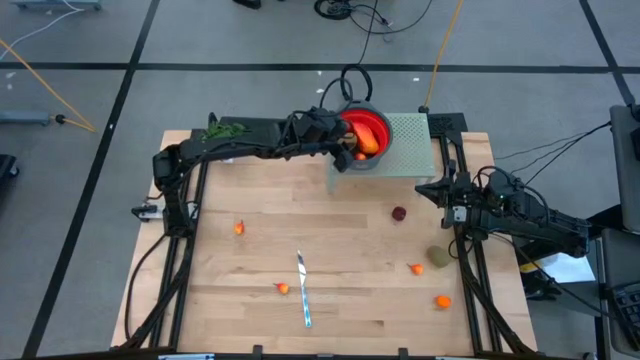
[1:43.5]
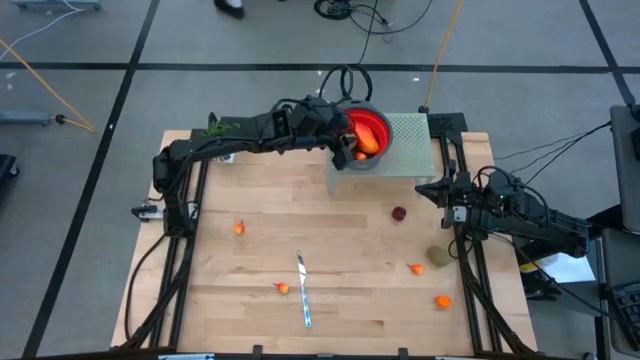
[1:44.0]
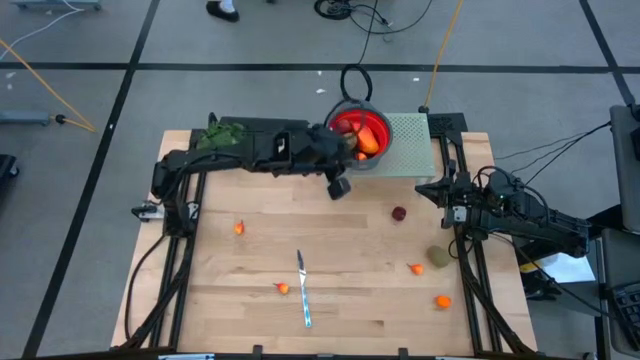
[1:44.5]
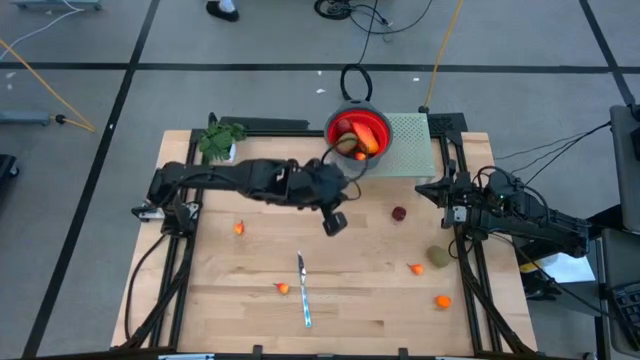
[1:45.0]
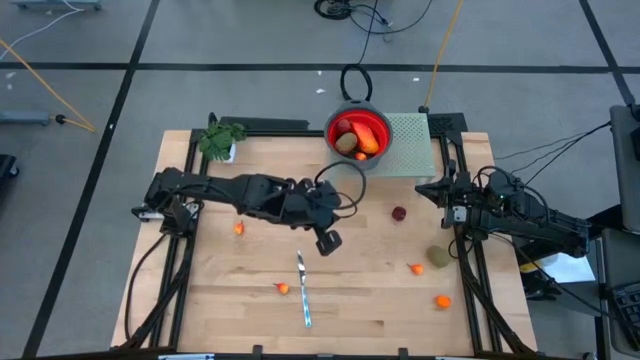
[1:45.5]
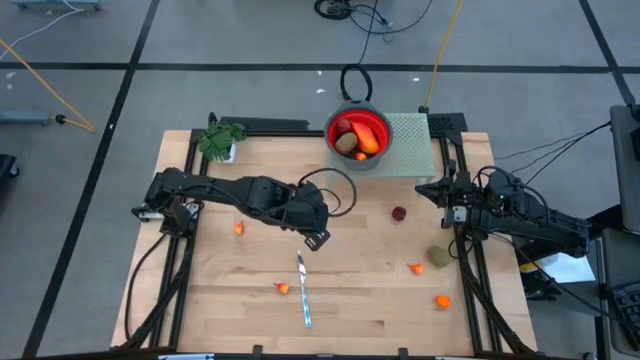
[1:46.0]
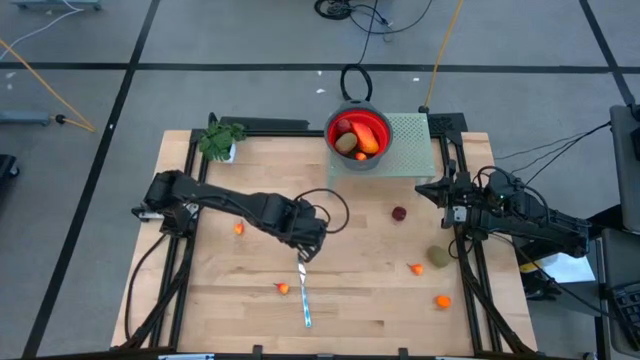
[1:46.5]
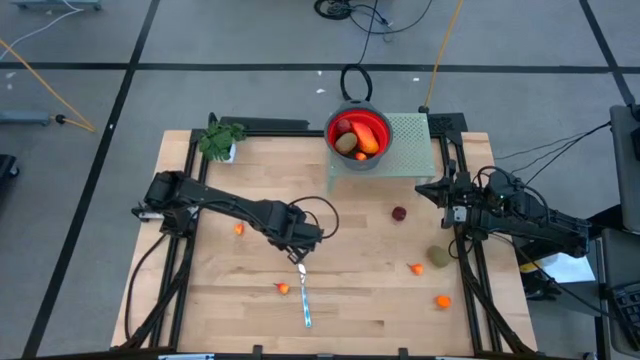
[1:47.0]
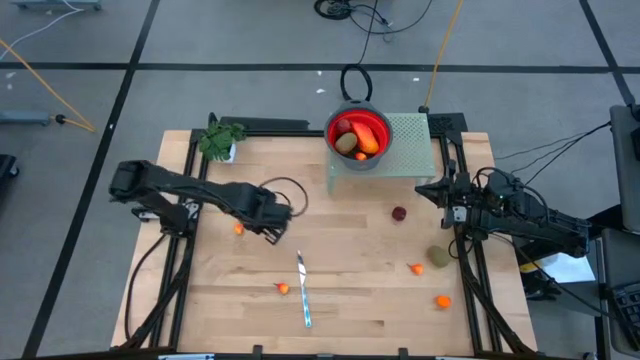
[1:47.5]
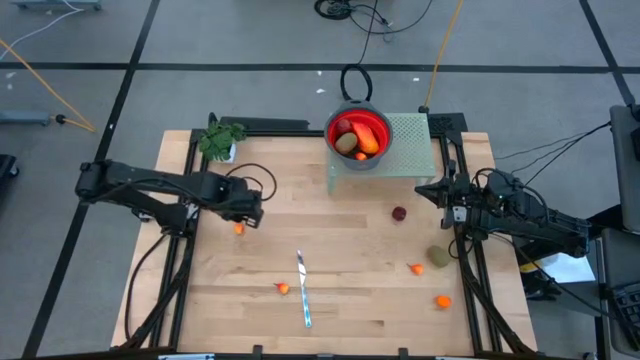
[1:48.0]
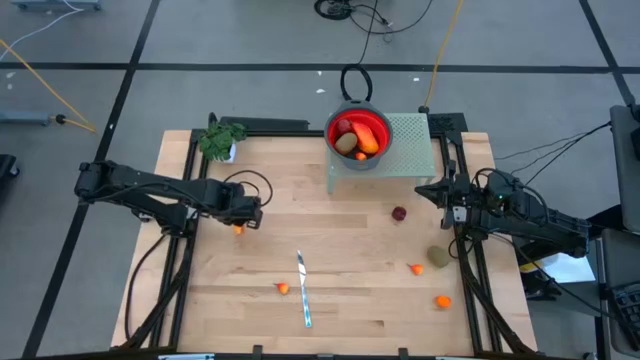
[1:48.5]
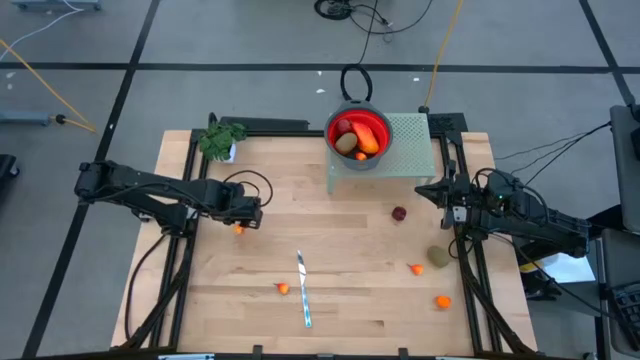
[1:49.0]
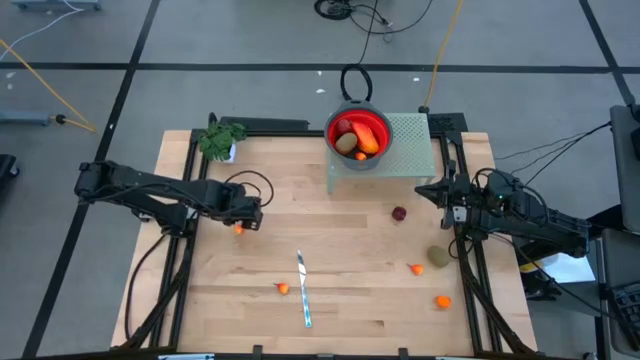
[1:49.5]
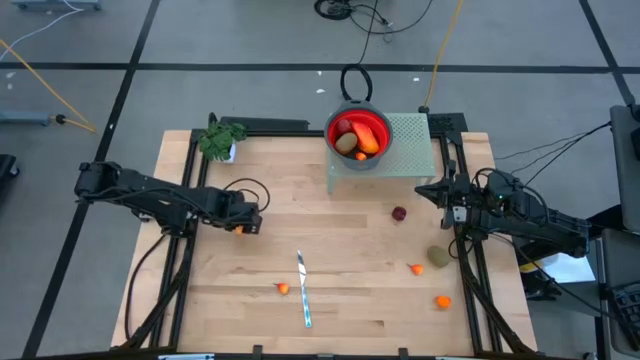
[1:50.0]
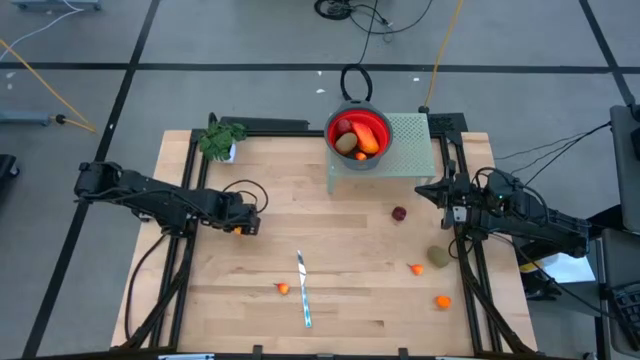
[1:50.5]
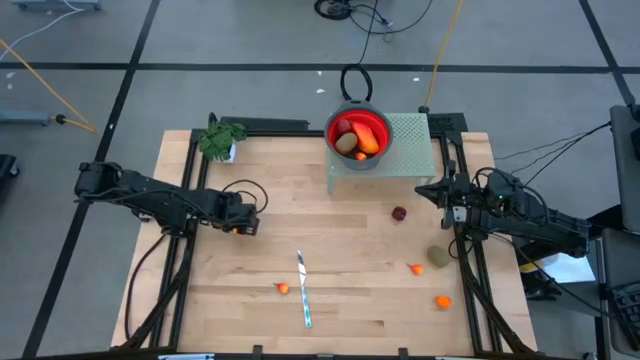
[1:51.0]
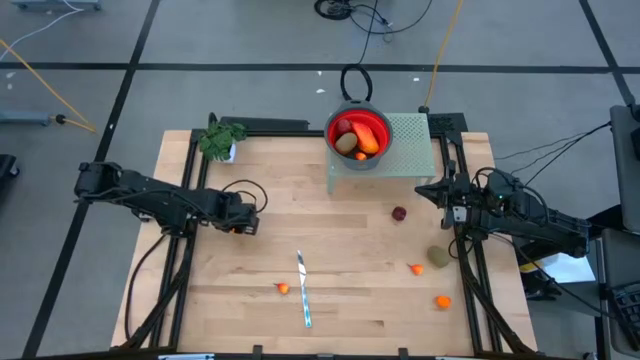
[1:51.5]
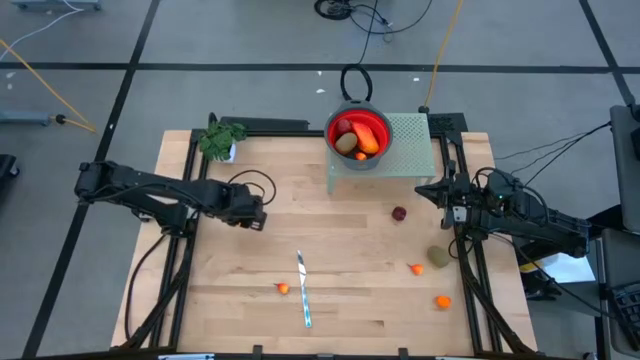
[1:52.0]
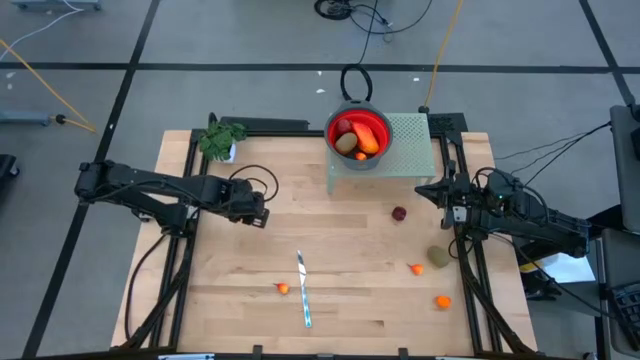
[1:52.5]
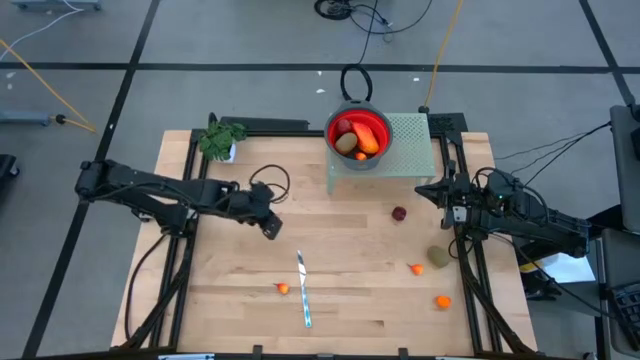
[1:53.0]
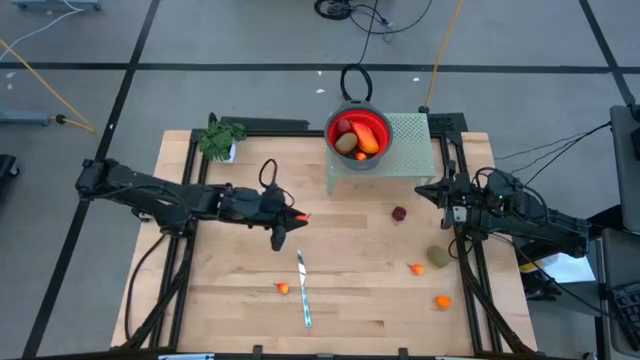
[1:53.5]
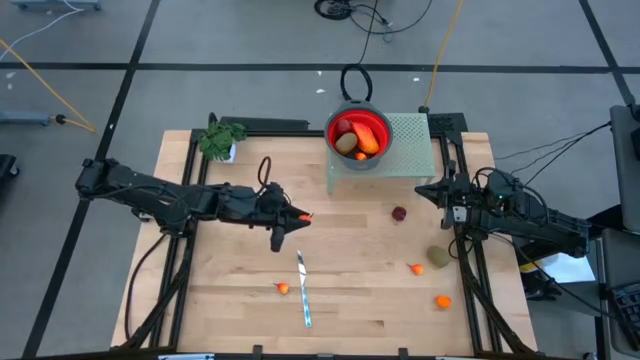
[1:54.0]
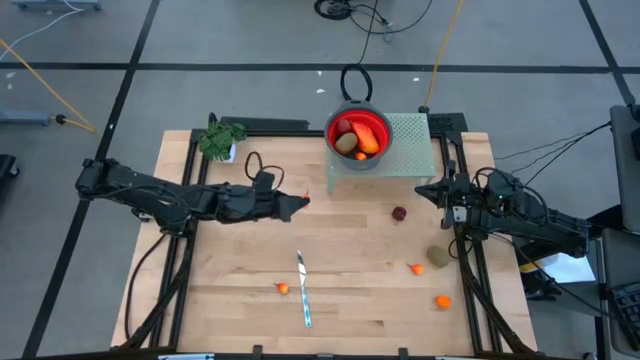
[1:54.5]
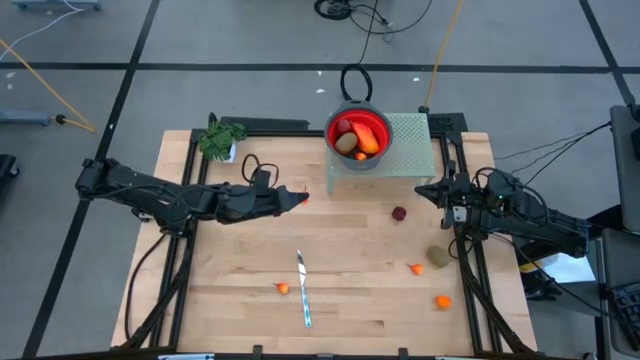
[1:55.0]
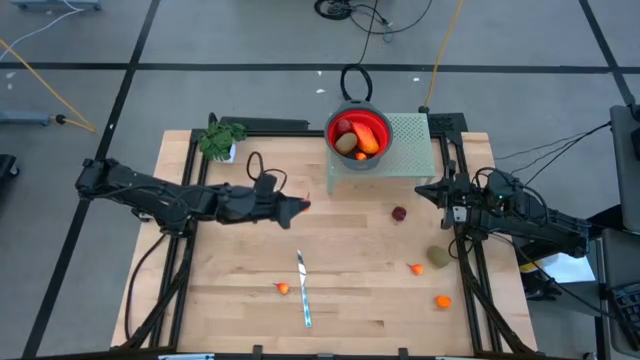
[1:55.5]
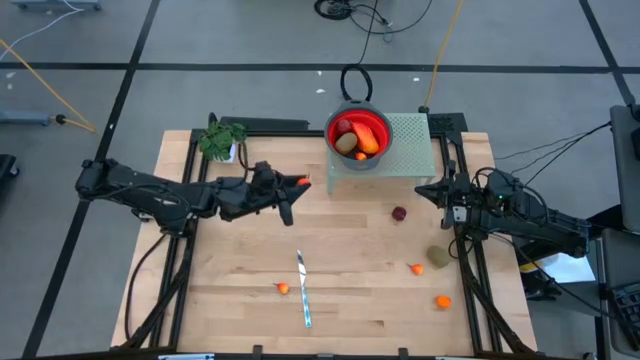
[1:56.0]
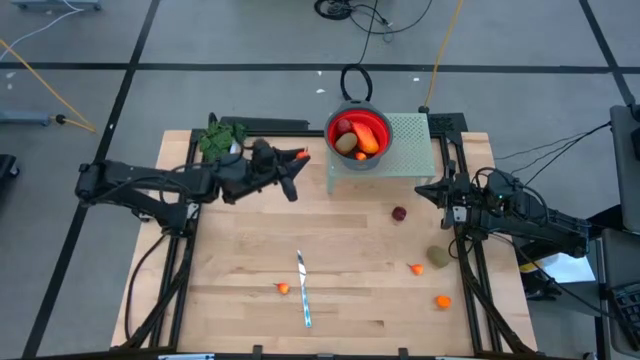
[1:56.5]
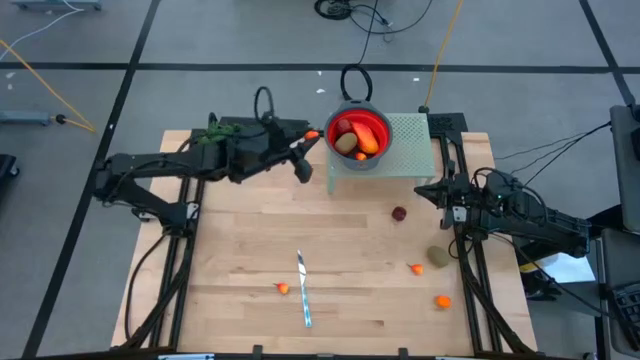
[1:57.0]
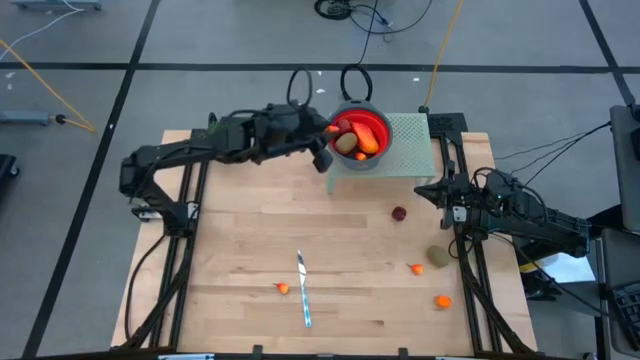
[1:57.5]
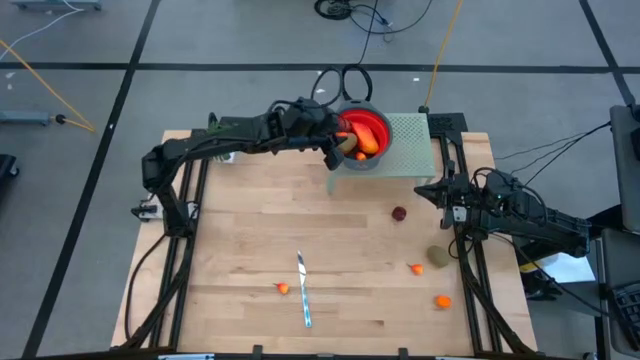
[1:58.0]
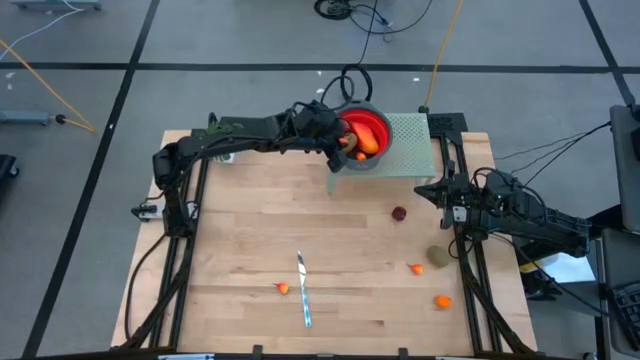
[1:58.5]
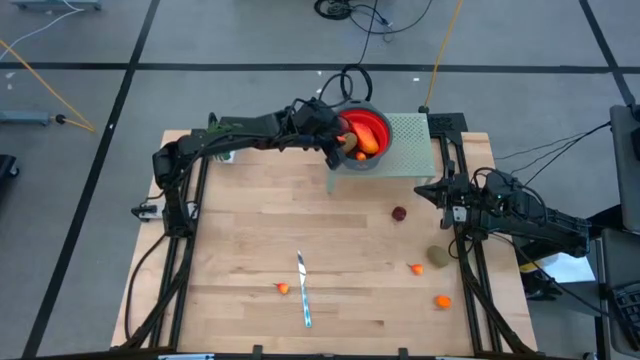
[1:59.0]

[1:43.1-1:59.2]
Task: Pick & Place Fruit
Put the peach into the red strainer bowl on the shelf

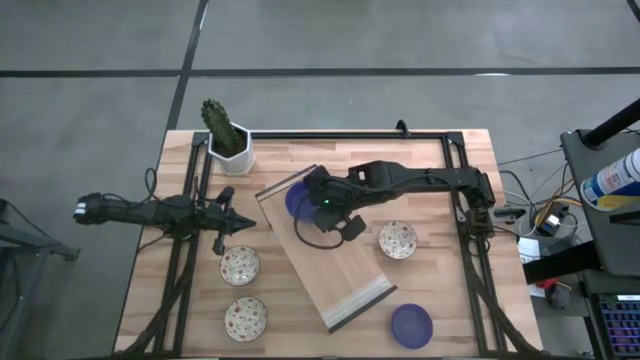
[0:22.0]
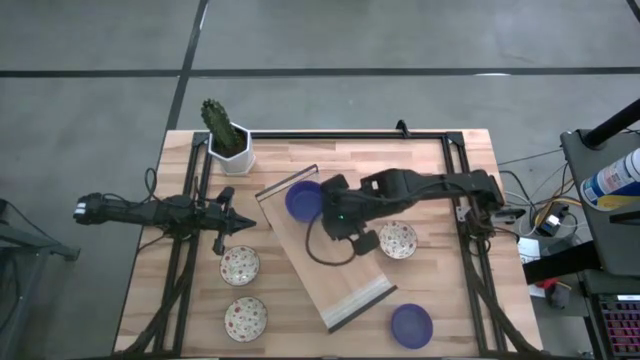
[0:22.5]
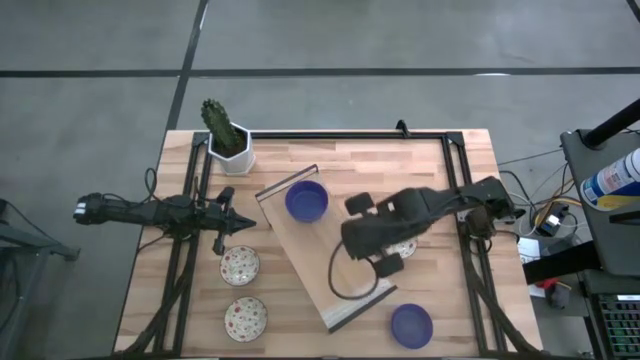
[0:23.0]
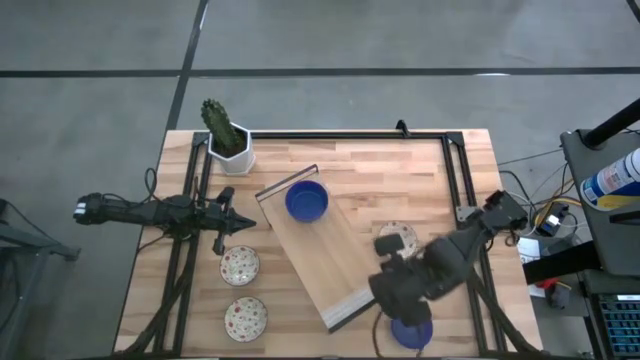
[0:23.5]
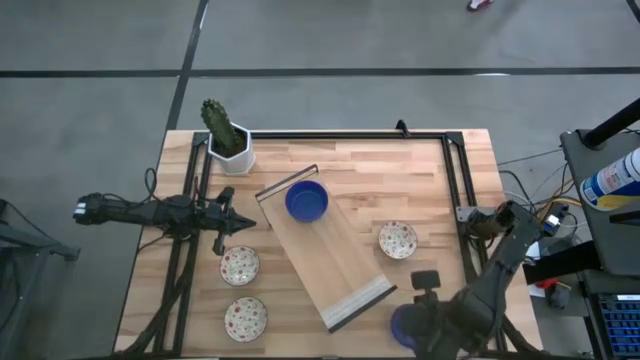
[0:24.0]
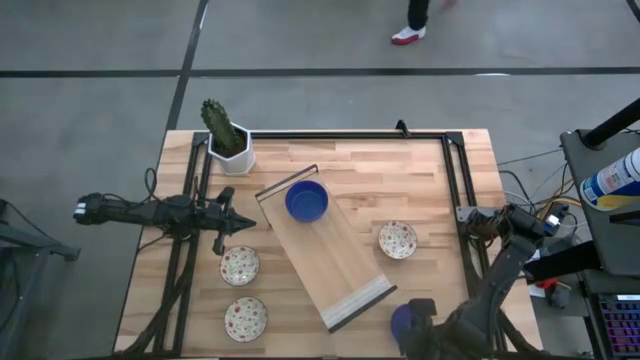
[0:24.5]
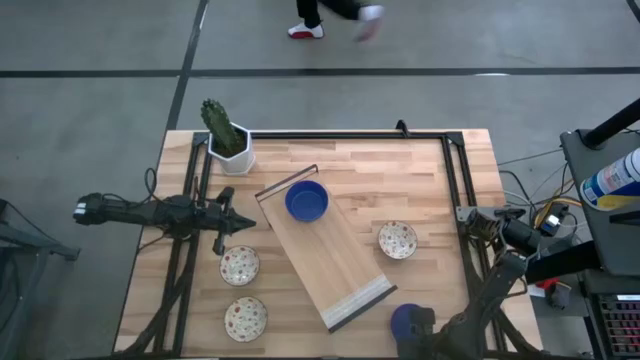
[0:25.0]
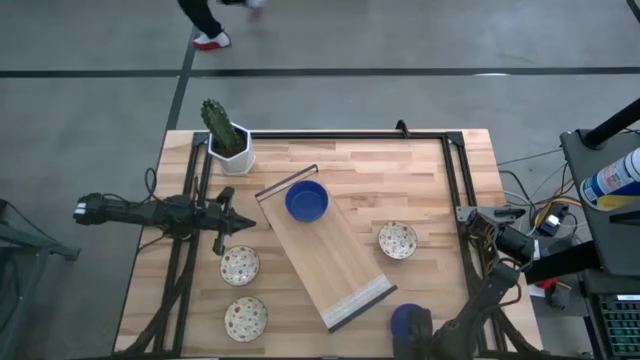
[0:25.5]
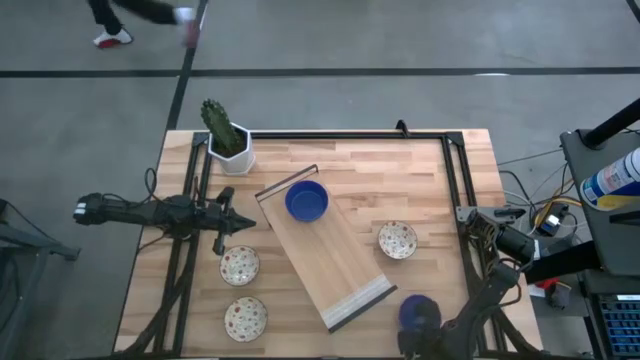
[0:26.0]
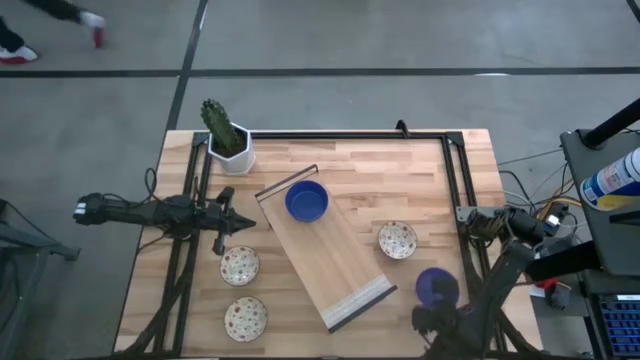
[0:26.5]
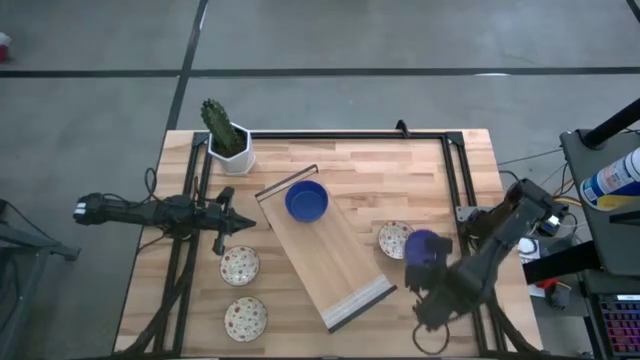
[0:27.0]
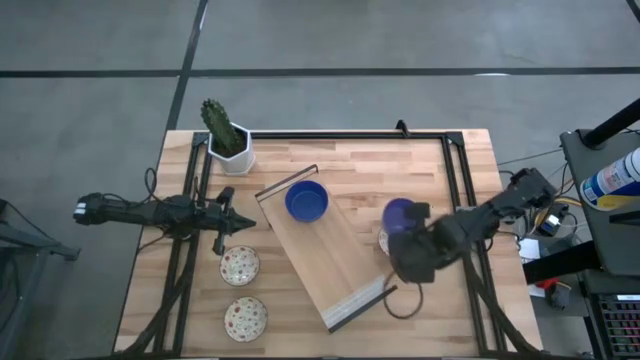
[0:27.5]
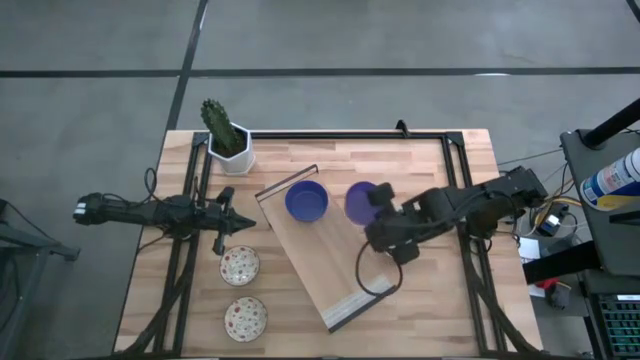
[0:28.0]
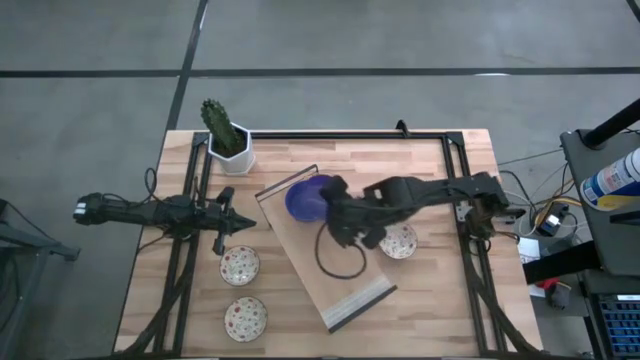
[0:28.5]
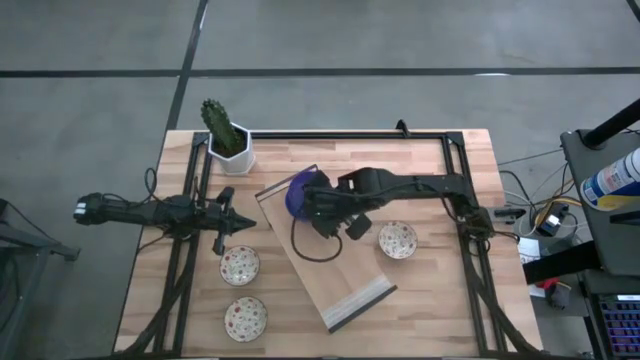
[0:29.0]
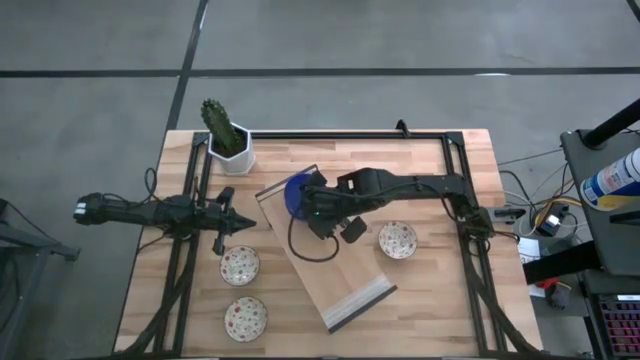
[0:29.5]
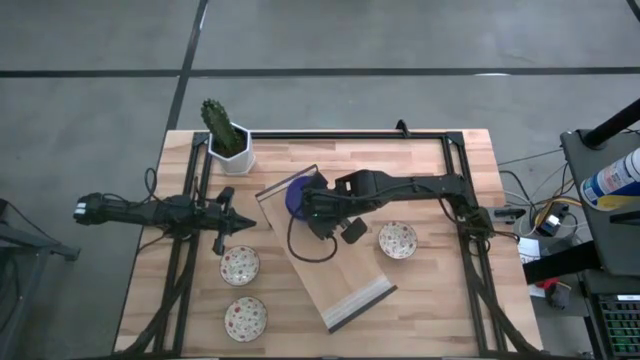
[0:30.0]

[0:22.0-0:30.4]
Task: Pick & Place Mini bowls
Stack the blue bowl on the blue bowl on the shelf
